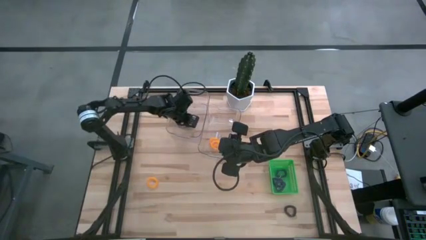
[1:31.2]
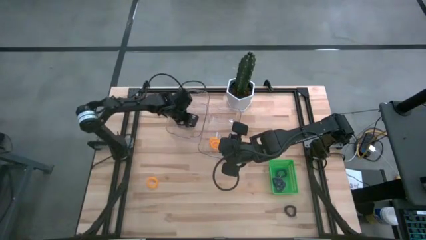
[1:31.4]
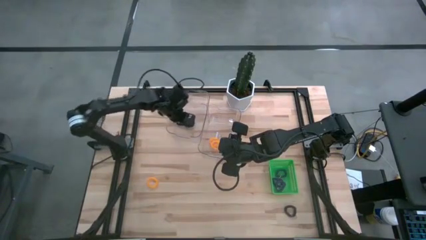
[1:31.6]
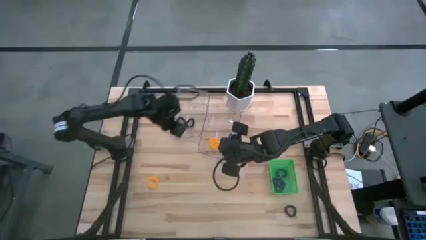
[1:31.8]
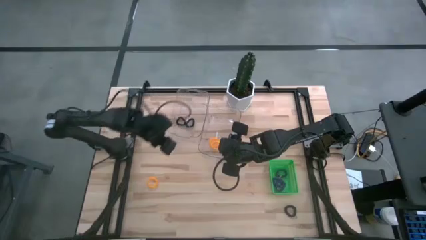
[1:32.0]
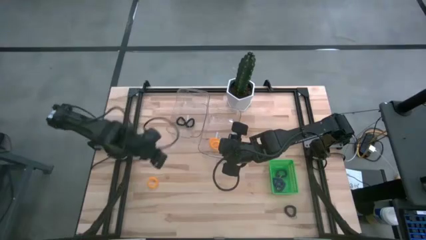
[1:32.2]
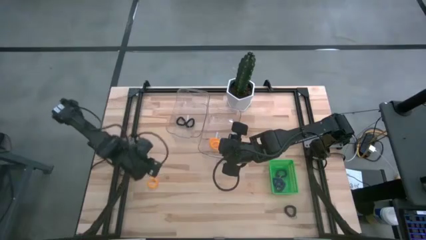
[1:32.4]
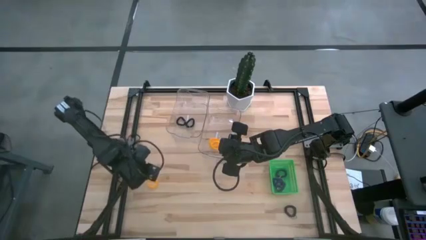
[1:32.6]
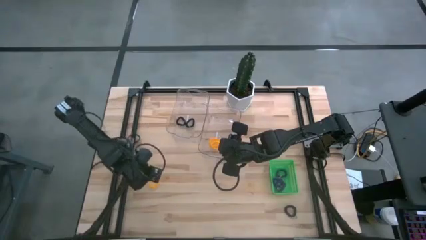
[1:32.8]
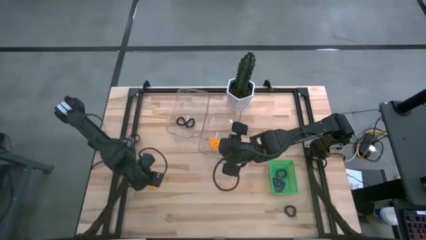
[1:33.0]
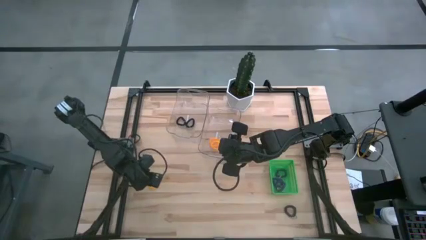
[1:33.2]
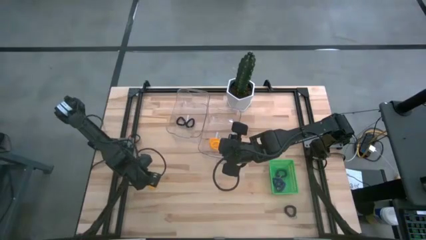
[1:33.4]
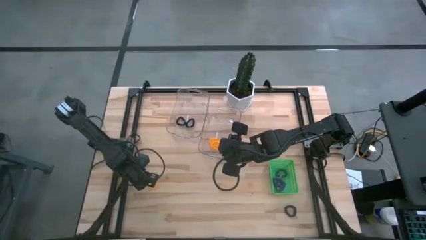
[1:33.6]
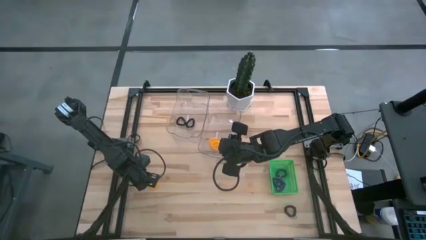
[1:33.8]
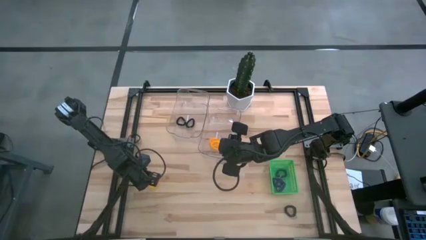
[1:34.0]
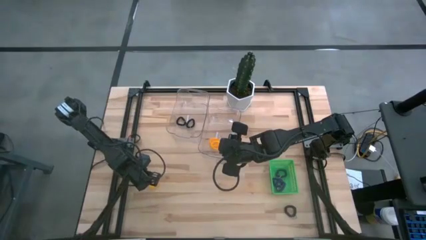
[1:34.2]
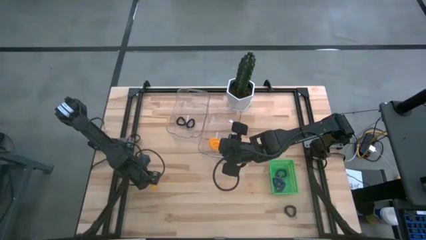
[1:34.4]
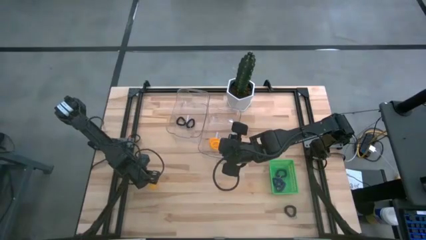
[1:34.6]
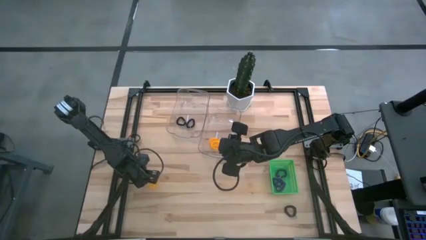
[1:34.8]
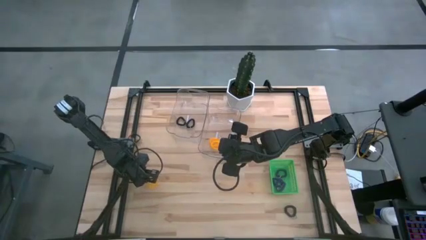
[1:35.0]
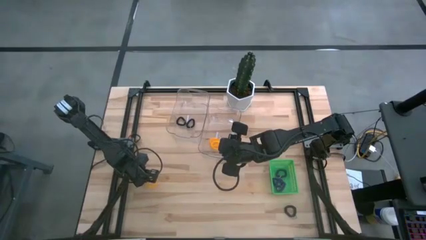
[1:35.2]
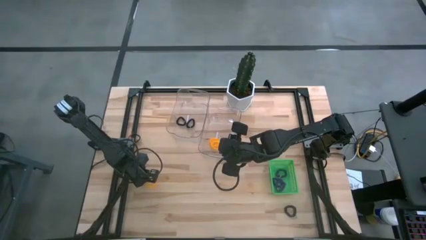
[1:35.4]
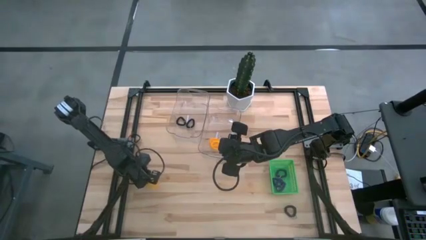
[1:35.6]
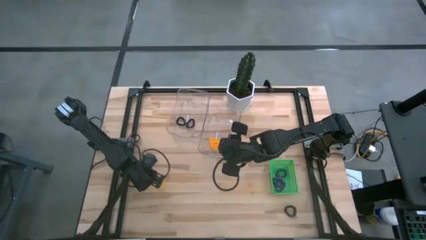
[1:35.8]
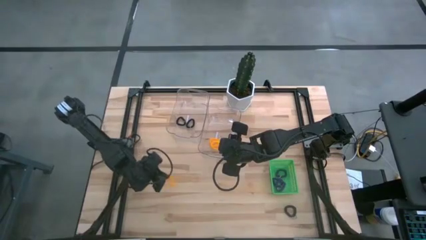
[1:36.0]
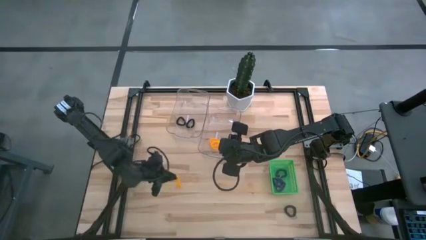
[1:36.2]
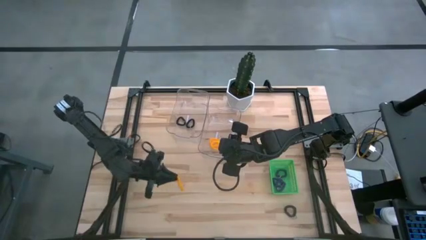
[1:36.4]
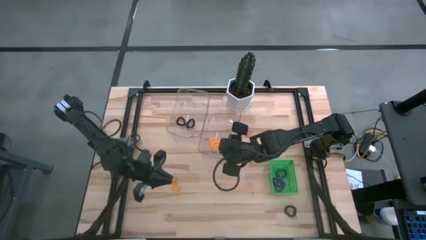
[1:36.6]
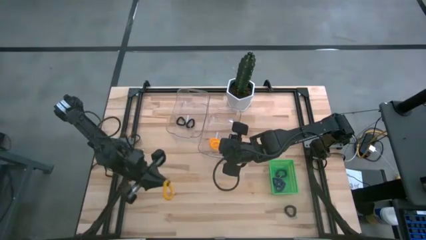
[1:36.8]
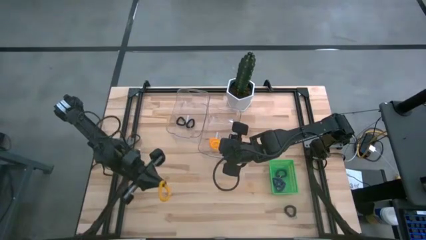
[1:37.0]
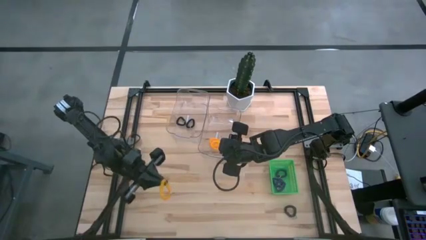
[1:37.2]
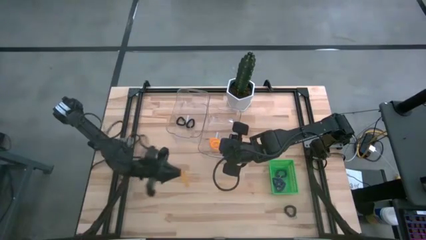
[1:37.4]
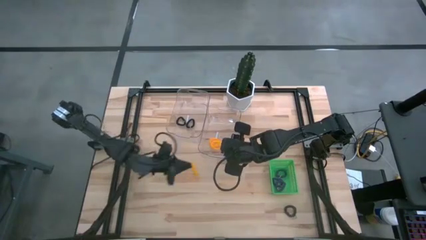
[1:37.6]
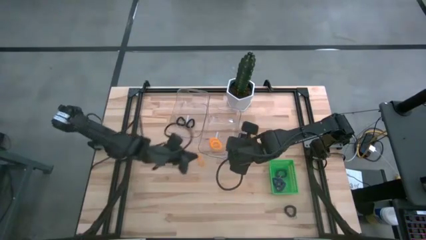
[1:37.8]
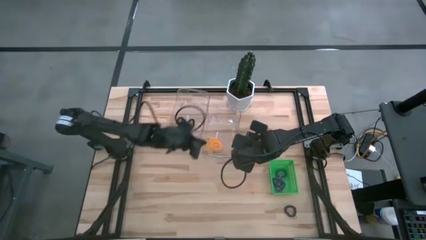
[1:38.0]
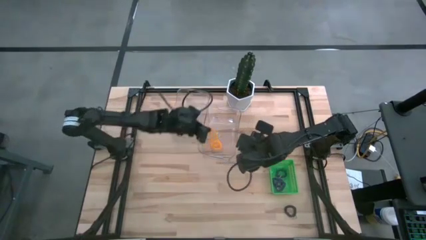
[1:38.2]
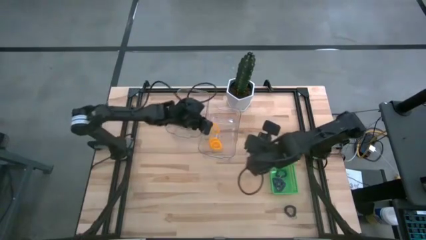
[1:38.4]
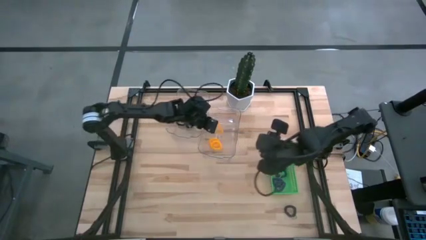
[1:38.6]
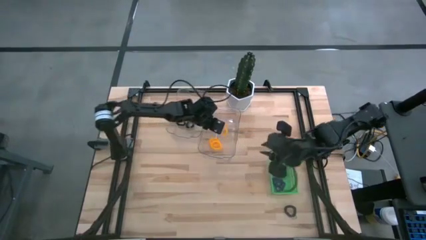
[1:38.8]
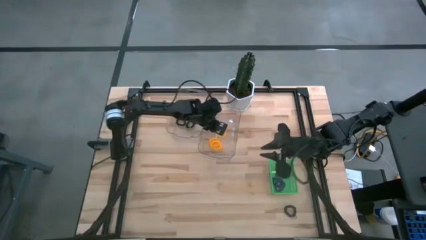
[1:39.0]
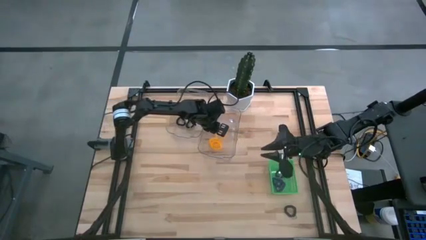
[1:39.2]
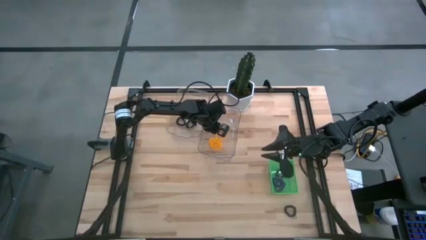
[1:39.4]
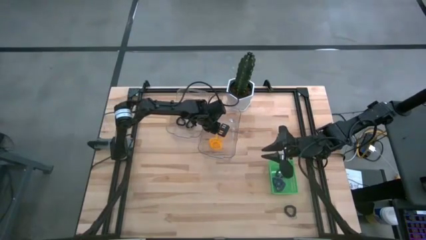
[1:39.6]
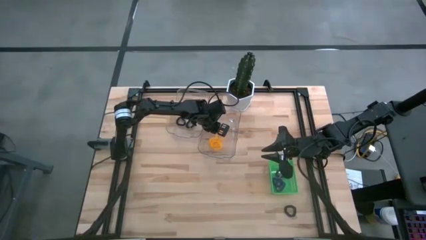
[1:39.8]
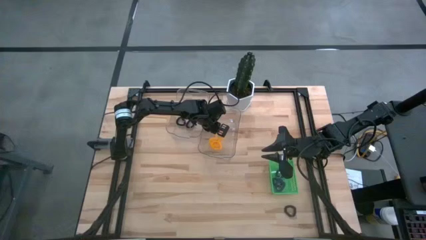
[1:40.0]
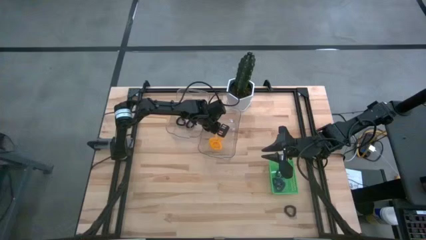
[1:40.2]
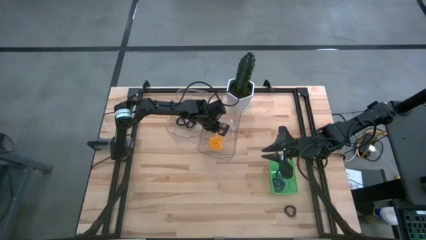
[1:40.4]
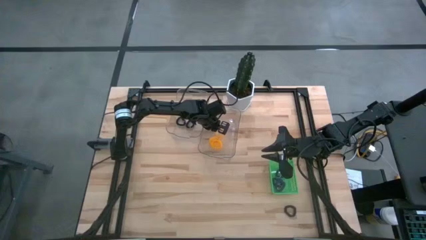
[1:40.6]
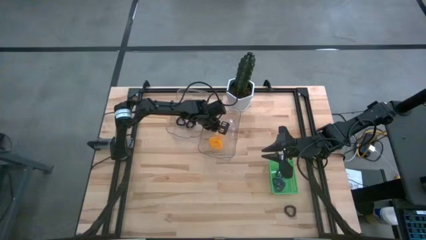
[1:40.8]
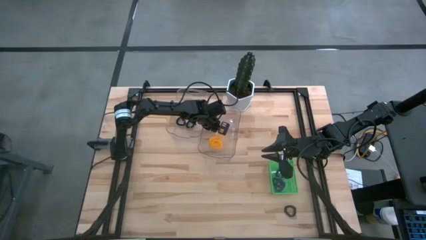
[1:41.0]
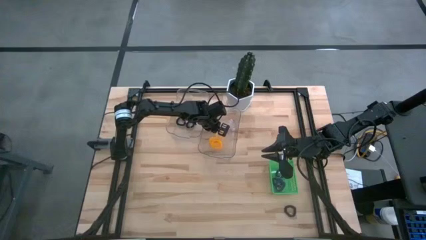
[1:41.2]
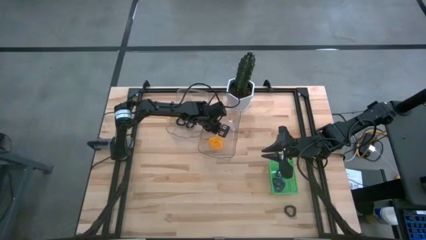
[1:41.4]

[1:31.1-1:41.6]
Task: Sort spring keychains
Put the yellow spring keychain into the right transparent bin

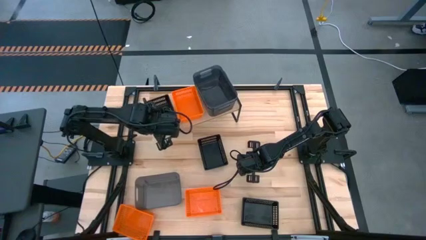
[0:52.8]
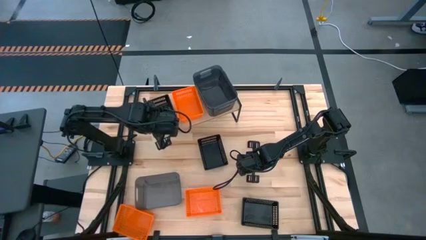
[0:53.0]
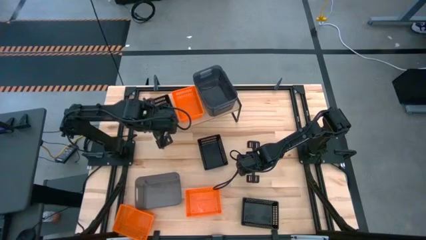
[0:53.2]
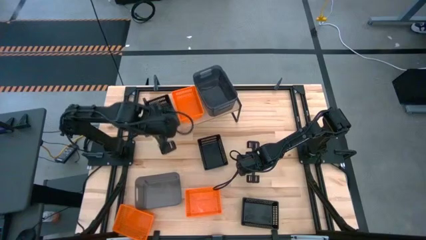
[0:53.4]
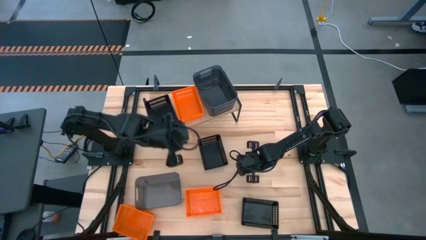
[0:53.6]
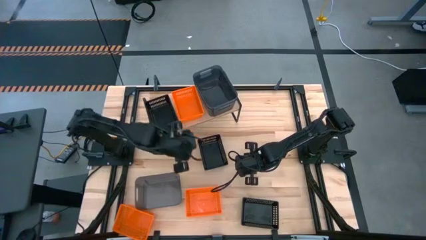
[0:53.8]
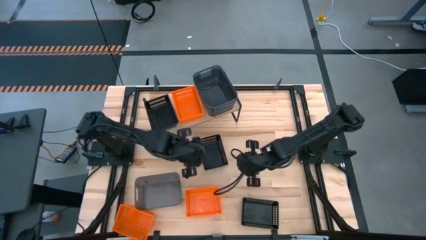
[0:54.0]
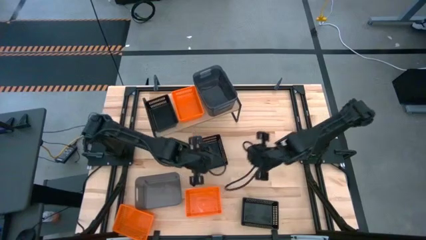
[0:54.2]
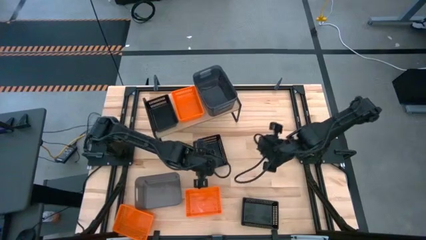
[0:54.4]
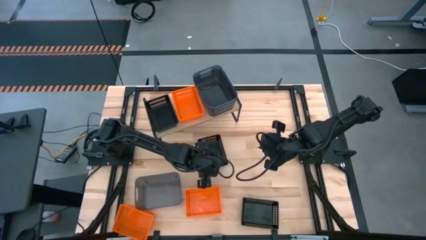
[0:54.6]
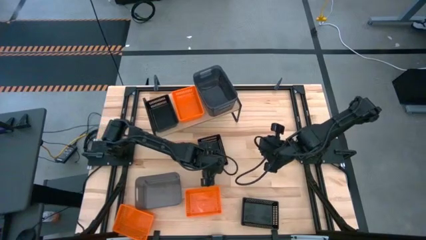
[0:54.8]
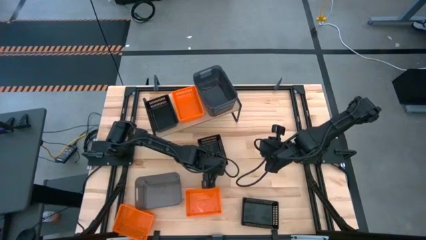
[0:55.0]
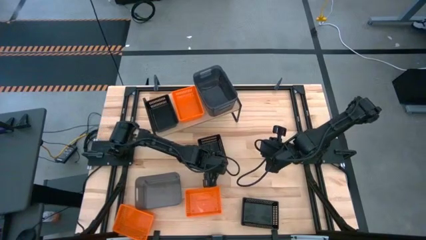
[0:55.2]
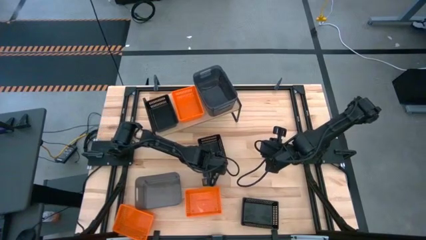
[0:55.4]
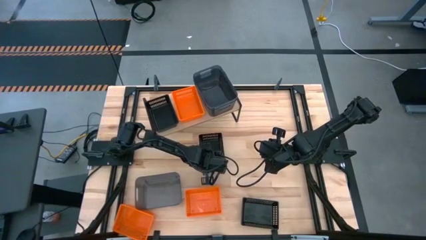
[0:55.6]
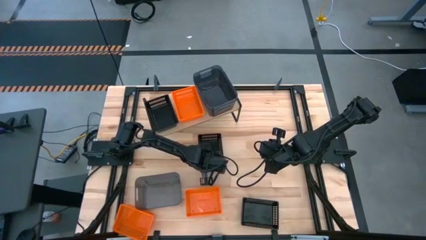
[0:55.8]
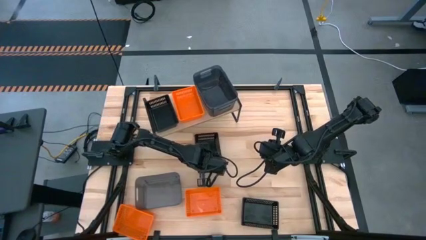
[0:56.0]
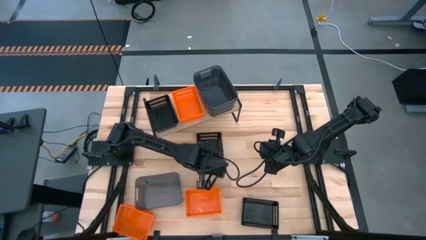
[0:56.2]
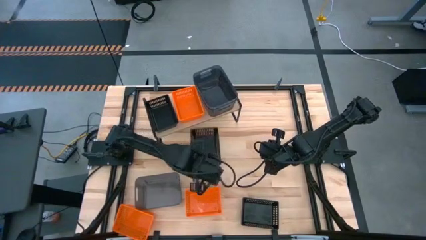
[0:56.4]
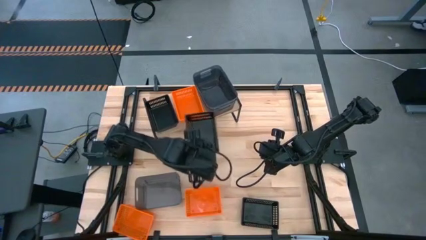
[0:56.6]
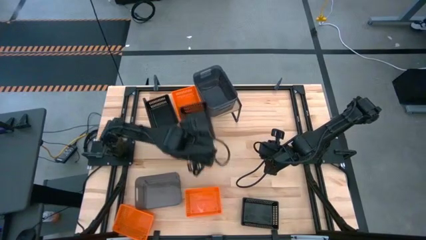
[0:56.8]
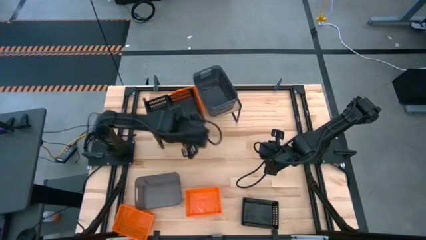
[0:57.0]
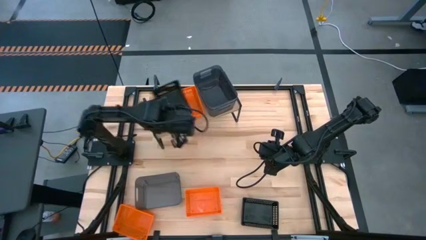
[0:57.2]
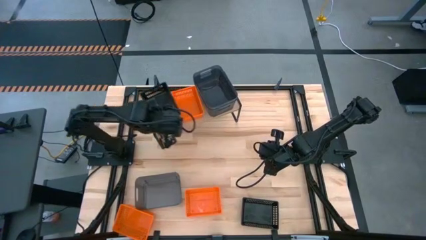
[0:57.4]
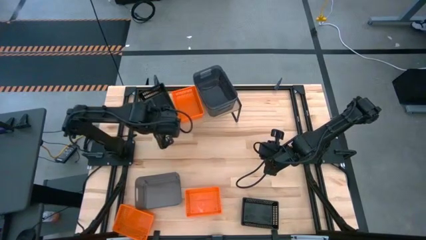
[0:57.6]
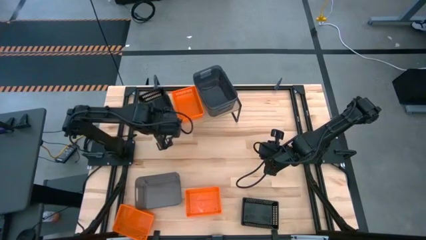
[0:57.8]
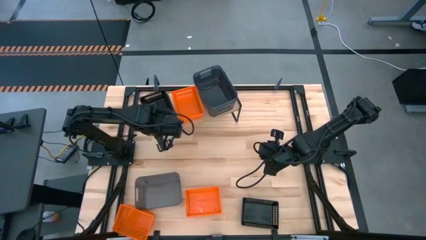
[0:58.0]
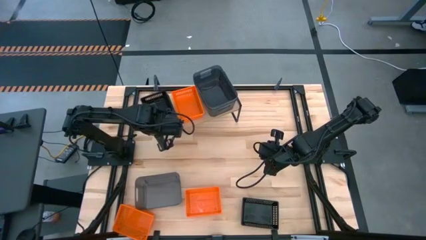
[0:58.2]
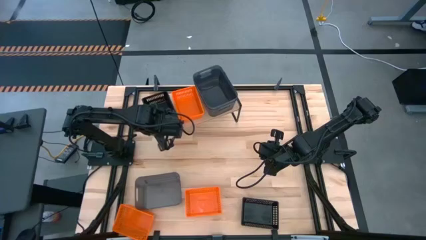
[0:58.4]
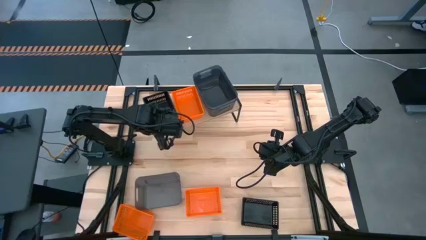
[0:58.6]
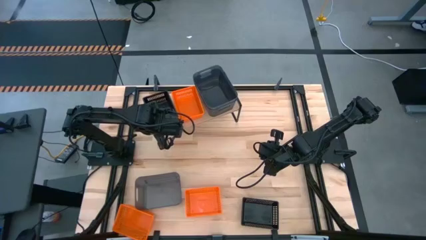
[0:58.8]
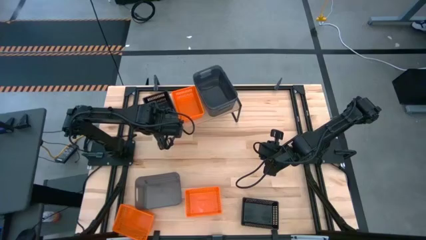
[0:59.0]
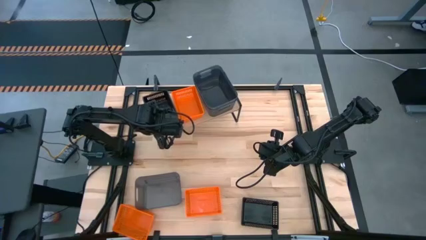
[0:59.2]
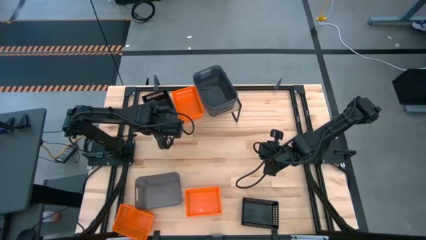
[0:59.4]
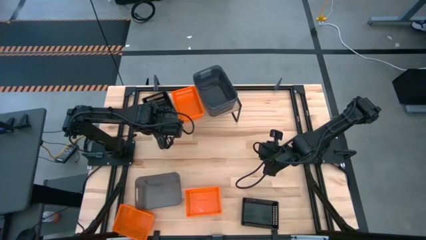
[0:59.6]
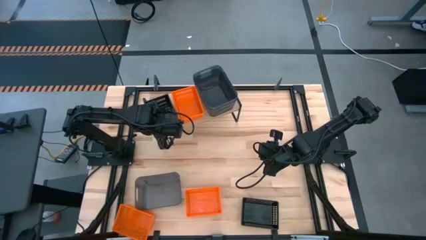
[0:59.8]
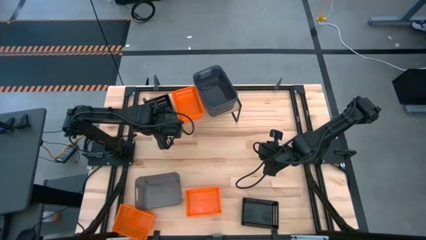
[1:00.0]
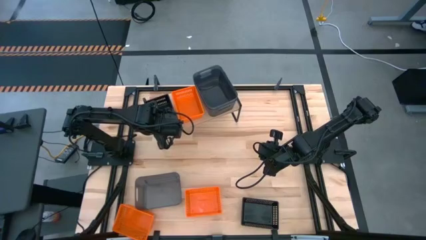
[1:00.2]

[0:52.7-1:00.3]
Task: Stack baskets on shelf by color
Stack the top black basket on top of the other black basket on the shelf
